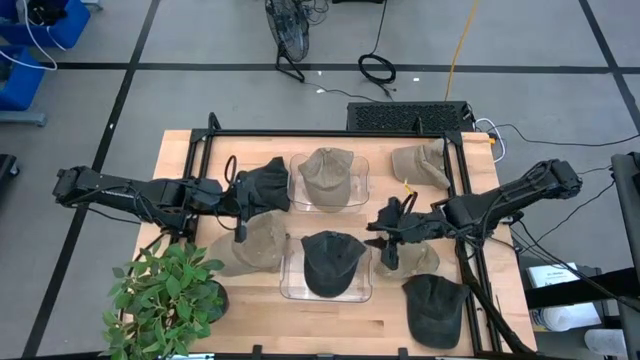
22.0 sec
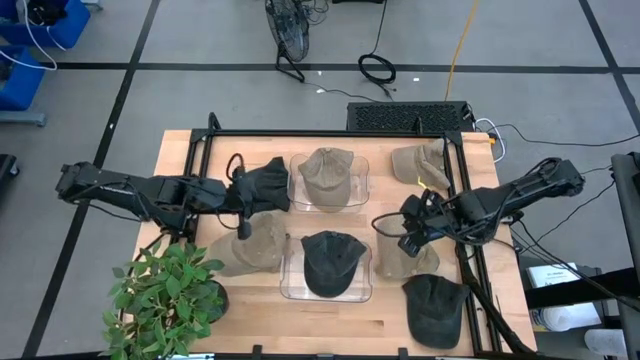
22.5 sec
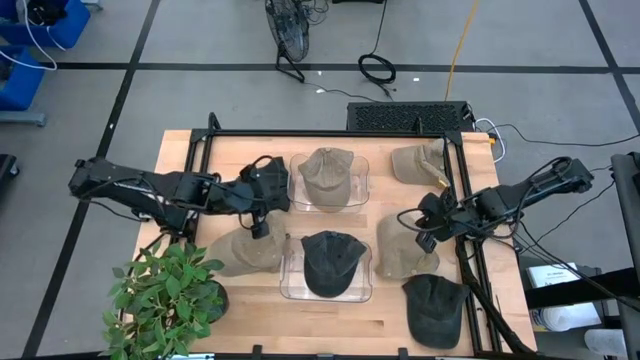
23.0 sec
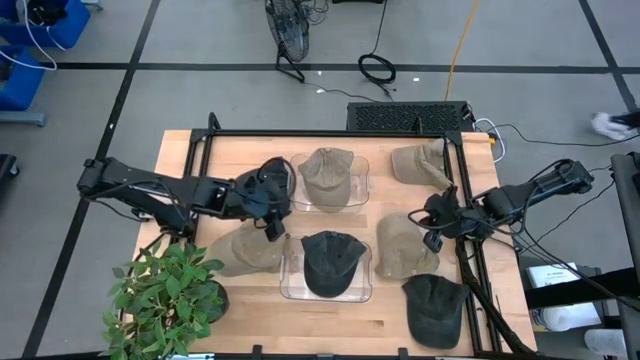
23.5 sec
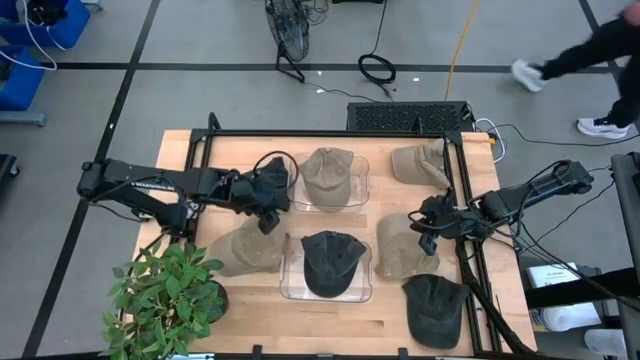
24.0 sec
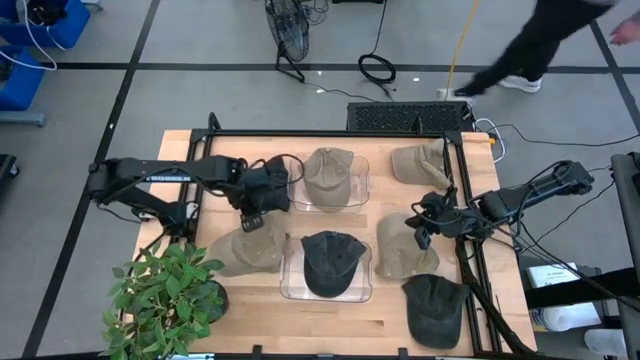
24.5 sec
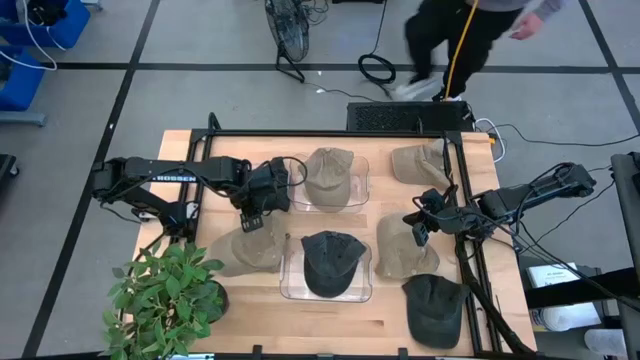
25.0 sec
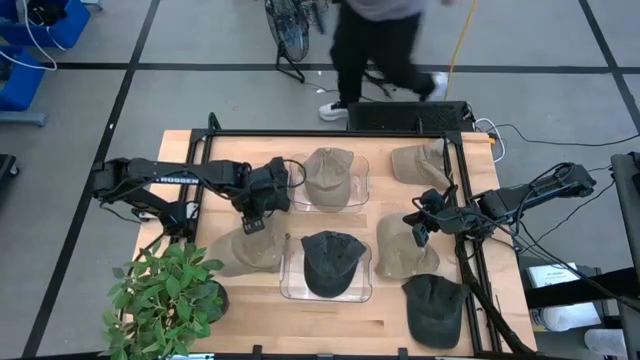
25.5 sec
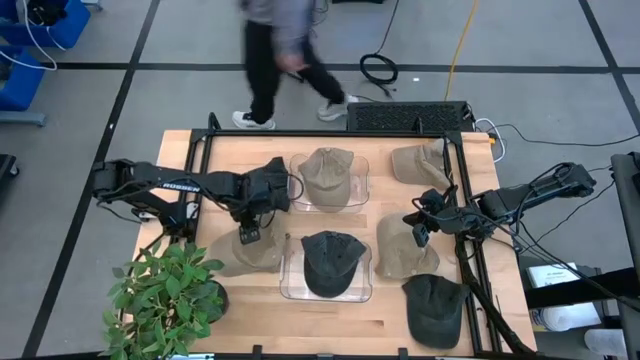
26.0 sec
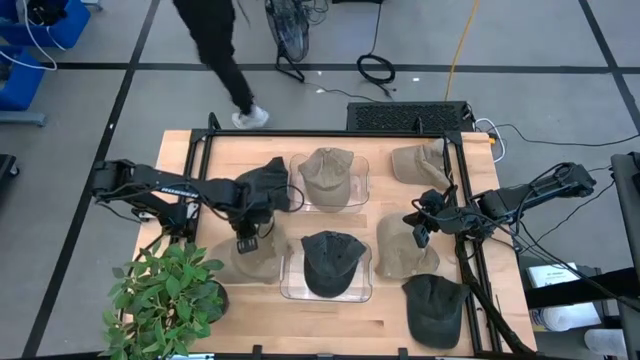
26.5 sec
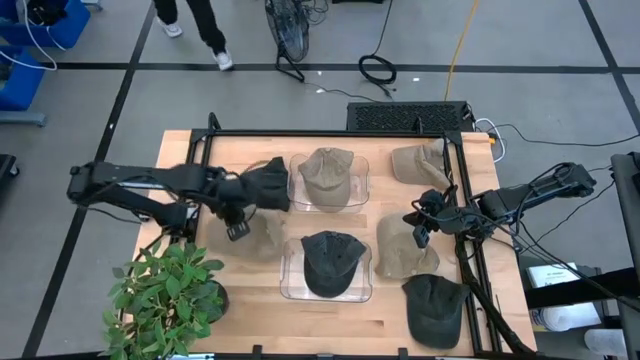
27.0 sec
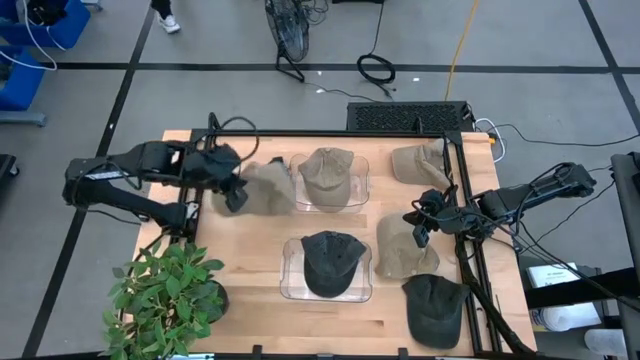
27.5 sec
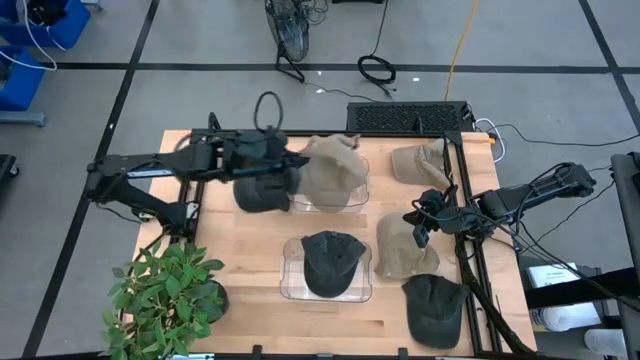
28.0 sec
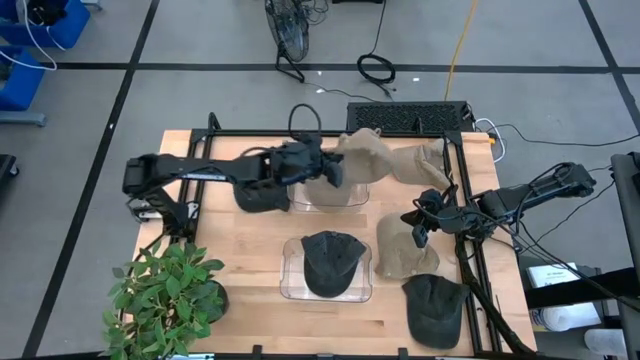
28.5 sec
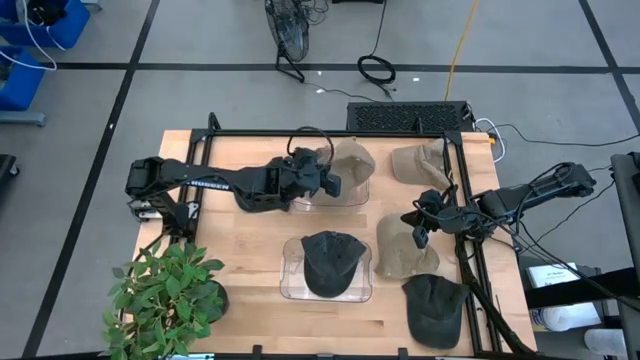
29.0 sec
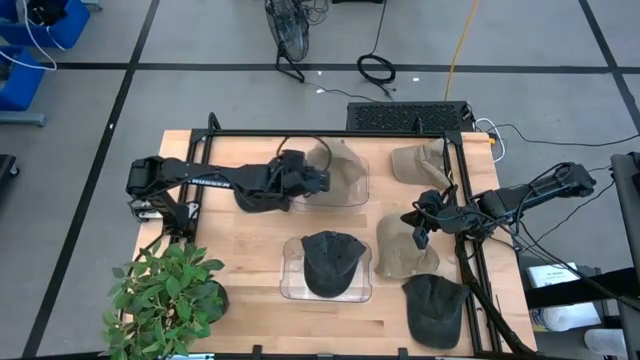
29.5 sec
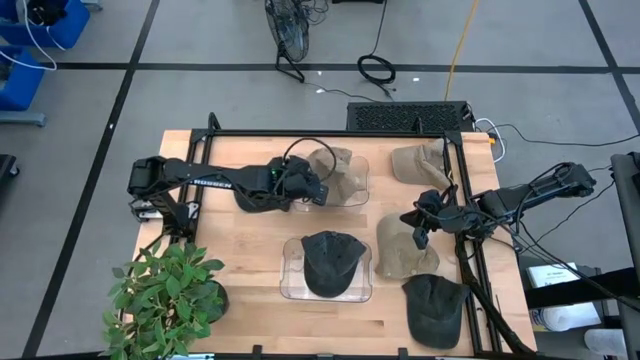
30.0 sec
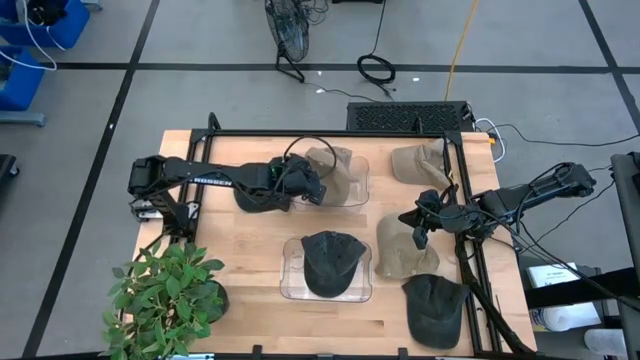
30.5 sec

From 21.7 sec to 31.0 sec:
Task: Pick & Place hat
Put the brown cap into the top transparent bin

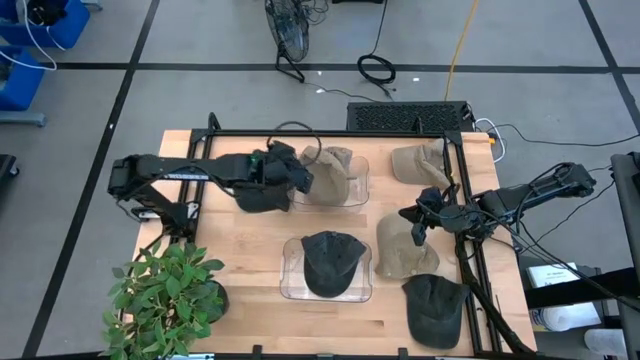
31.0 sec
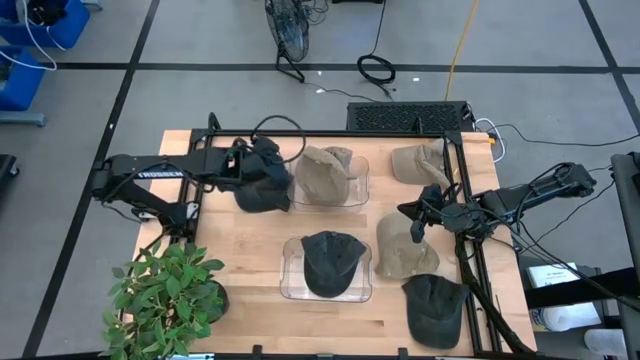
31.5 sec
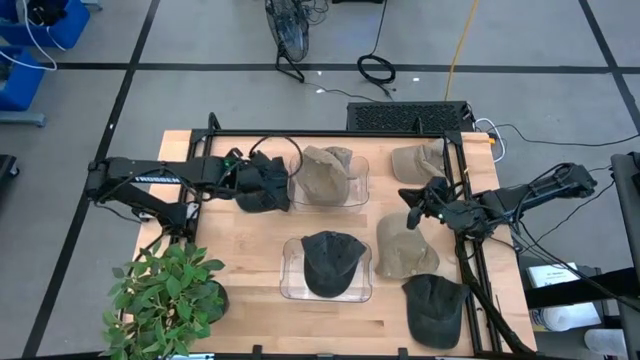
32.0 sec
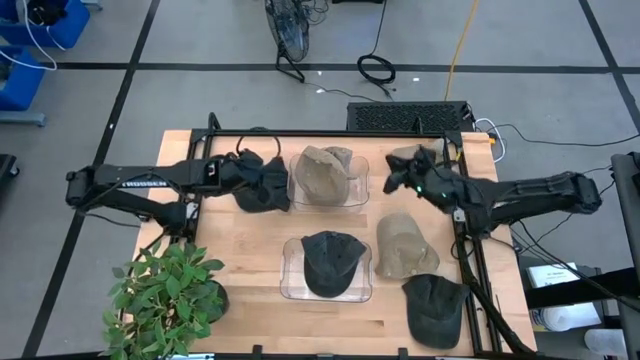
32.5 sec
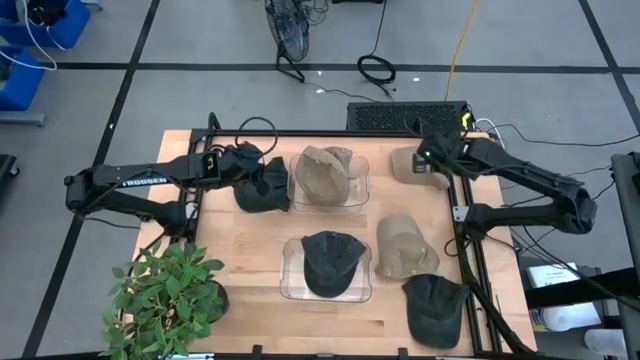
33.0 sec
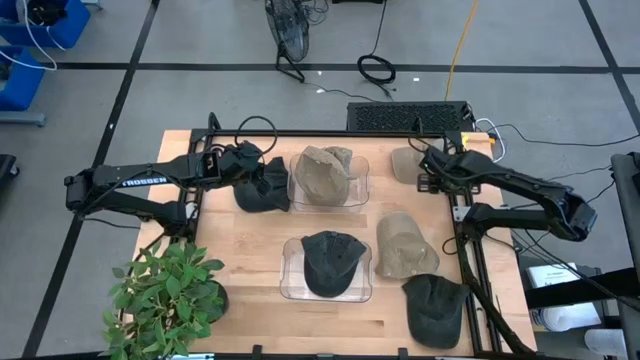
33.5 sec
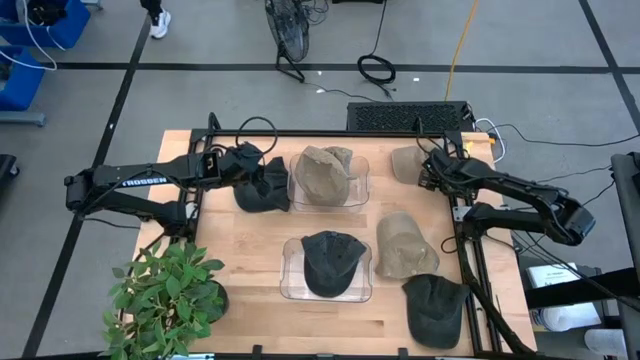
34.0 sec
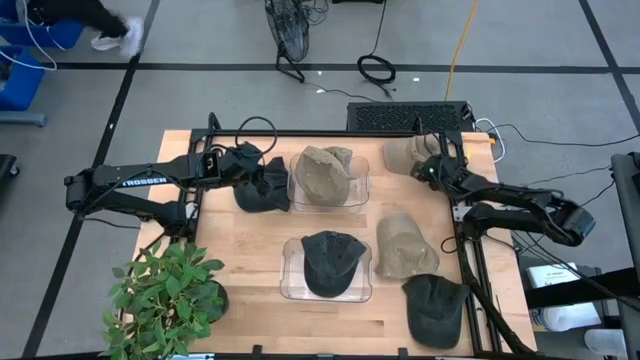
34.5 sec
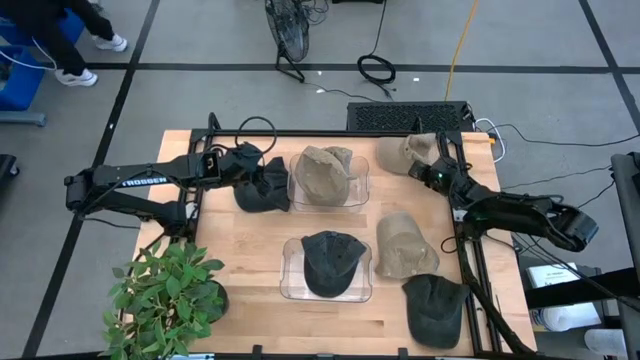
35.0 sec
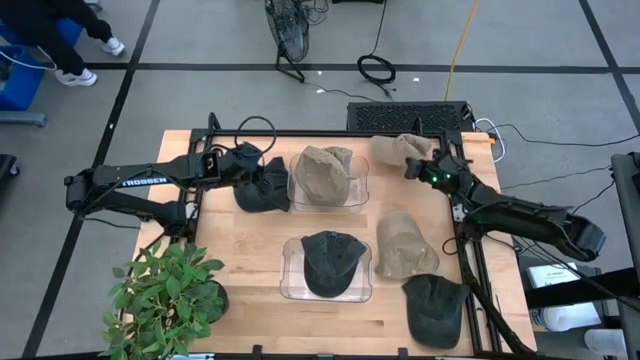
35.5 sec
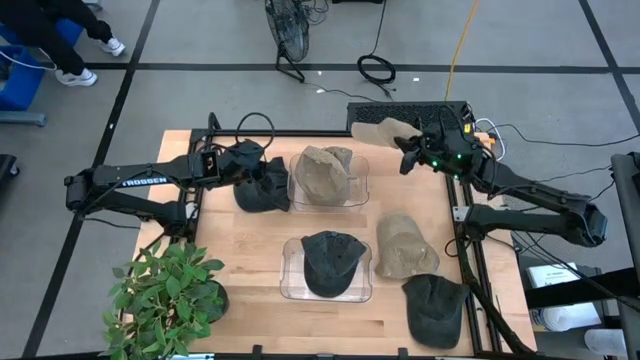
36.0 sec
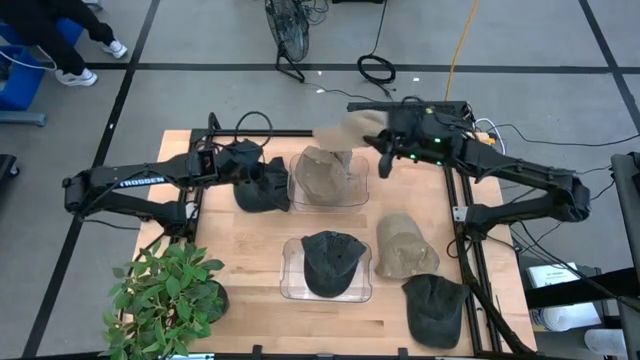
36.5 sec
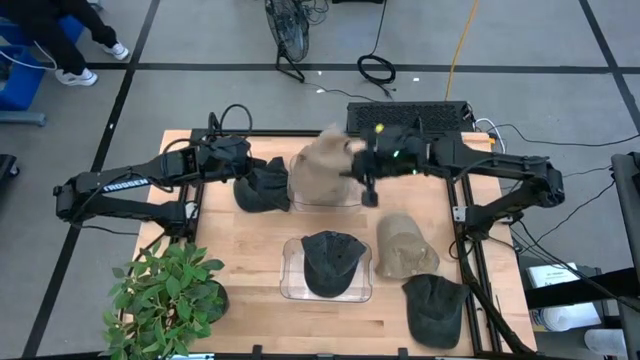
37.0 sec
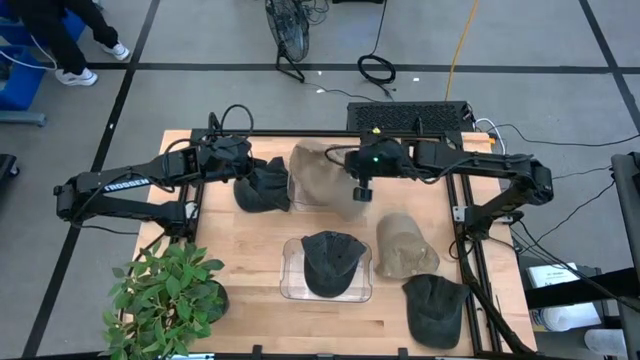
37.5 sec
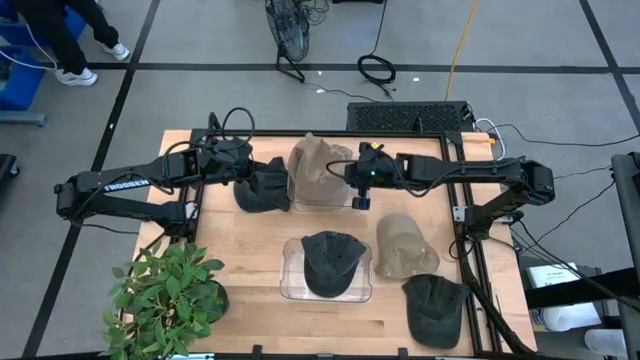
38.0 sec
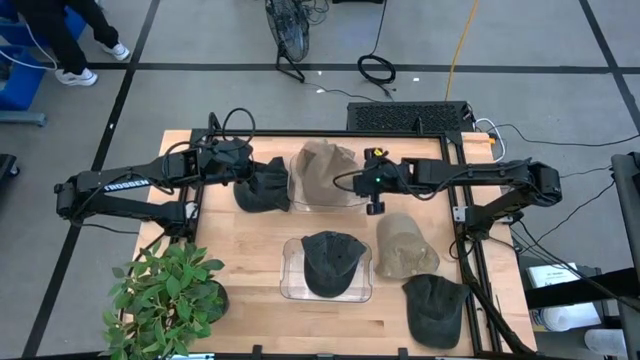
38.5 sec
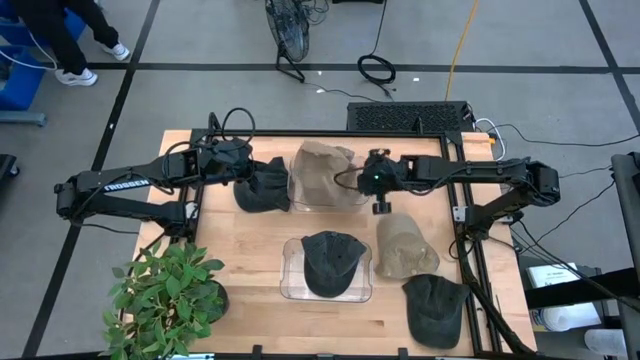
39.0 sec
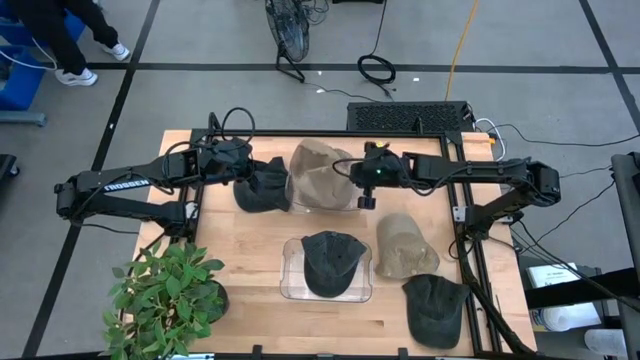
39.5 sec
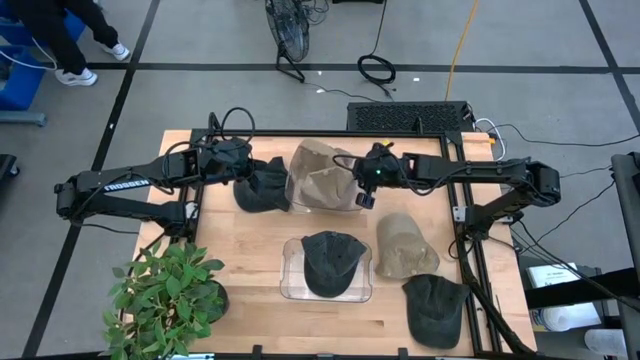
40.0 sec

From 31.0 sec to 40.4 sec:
Put the brown cap into the top transparent bin

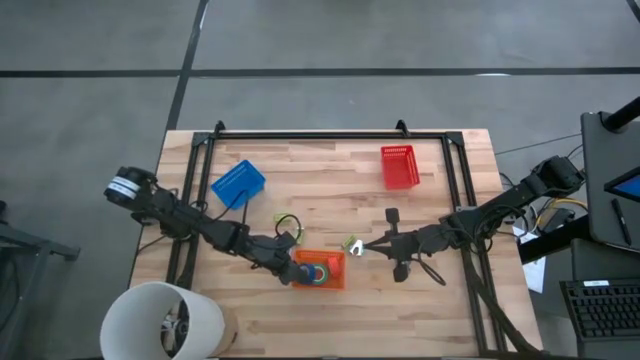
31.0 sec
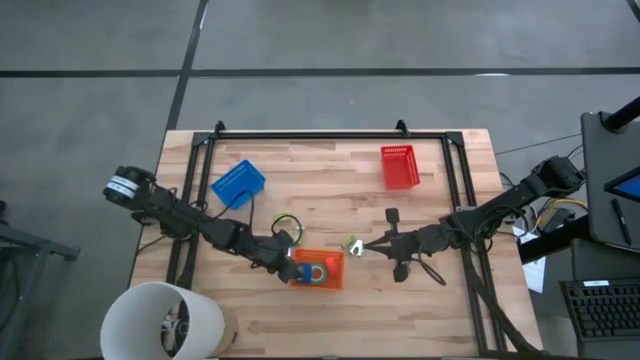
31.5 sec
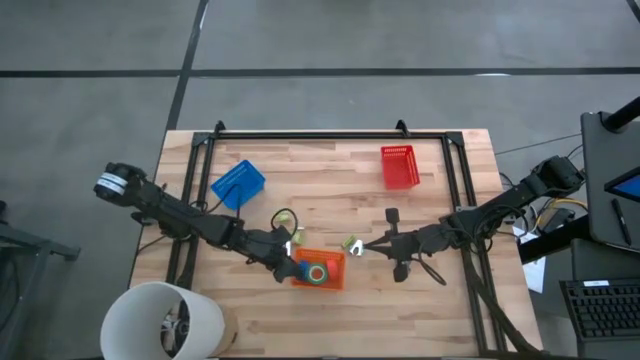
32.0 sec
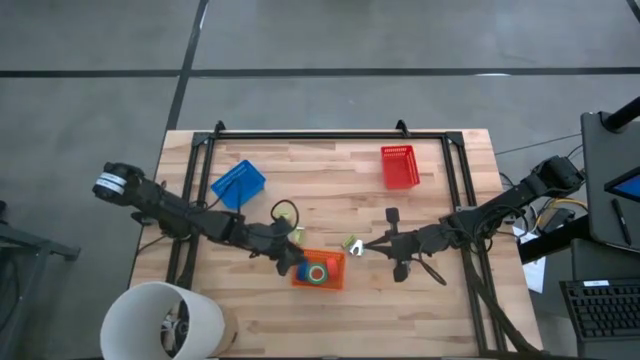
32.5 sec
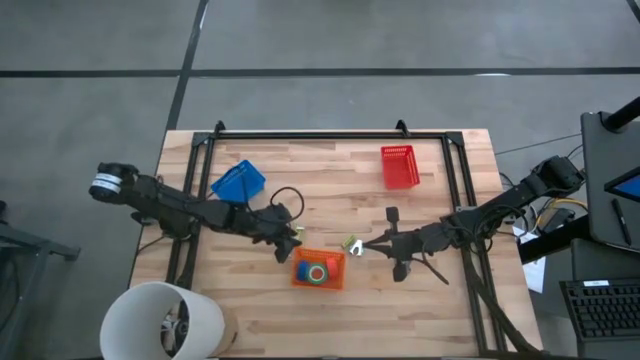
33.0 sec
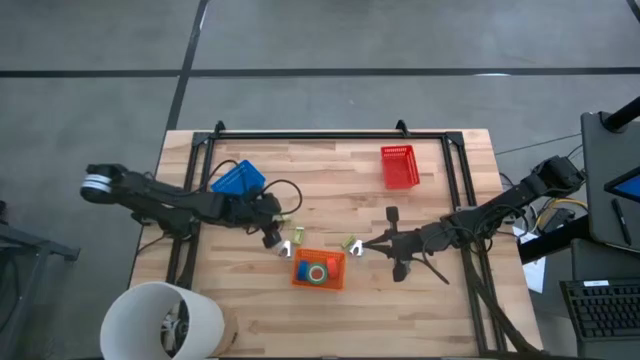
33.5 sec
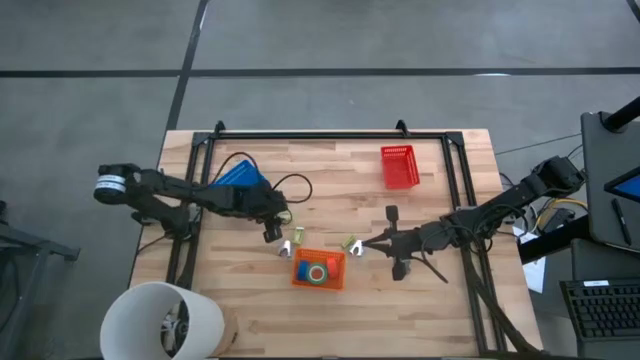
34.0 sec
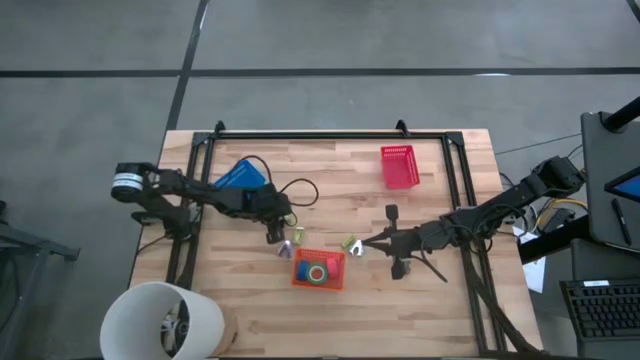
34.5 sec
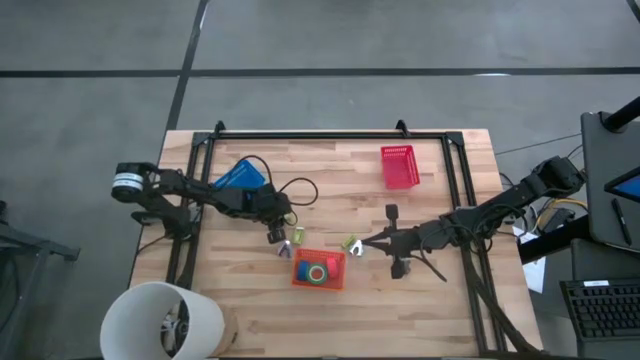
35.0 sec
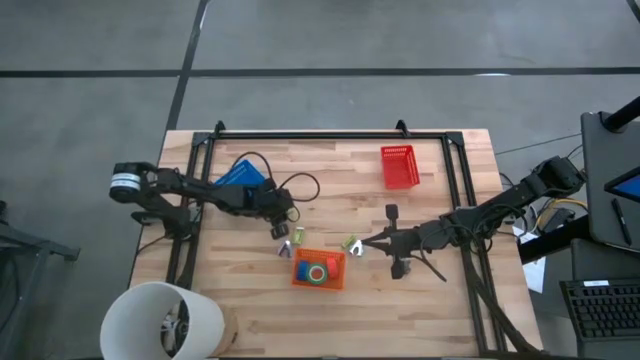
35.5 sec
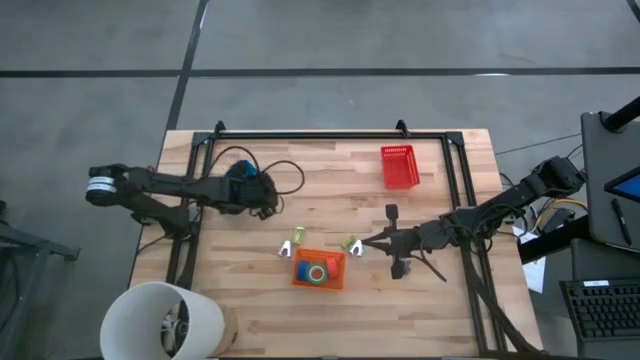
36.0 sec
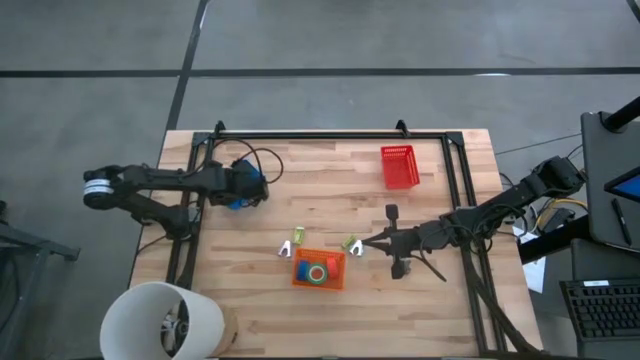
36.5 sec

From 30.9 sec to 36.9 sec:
Task: Pick and place Stapler, Stapler remover, tape
Put the green staple box into the blue bin
